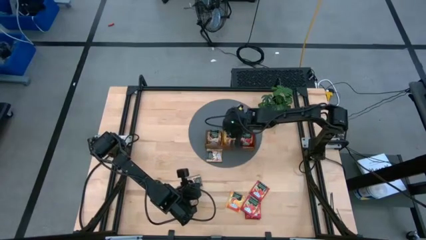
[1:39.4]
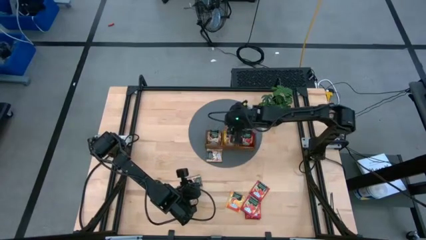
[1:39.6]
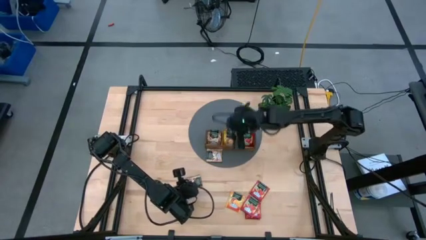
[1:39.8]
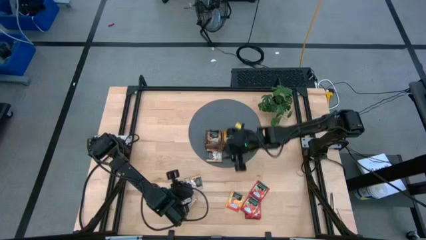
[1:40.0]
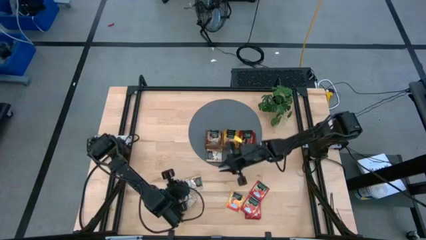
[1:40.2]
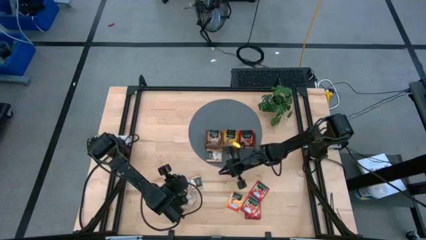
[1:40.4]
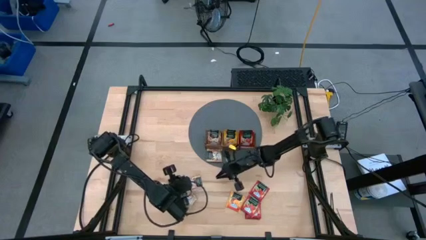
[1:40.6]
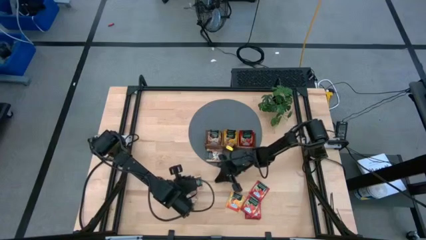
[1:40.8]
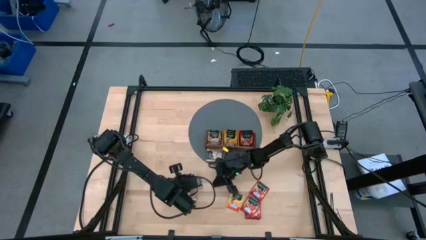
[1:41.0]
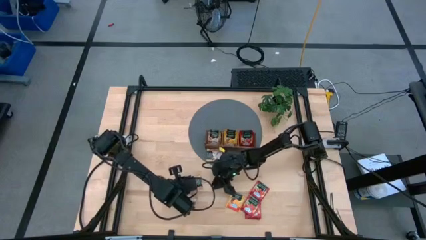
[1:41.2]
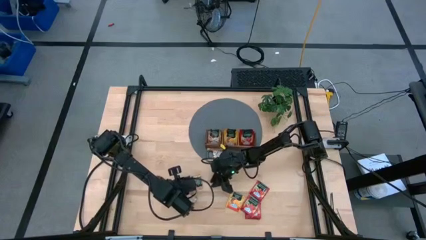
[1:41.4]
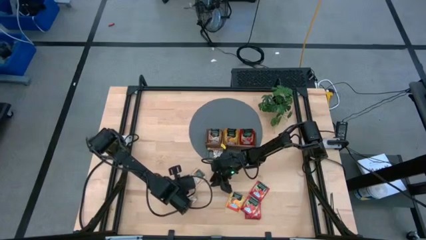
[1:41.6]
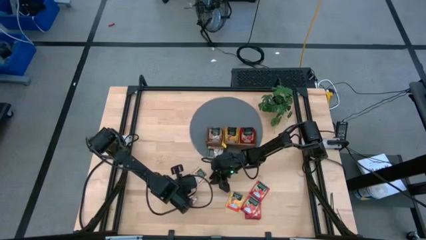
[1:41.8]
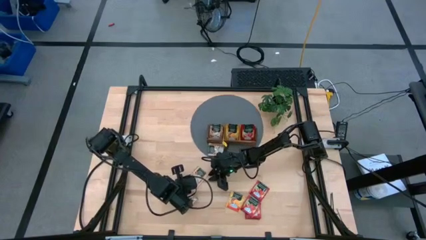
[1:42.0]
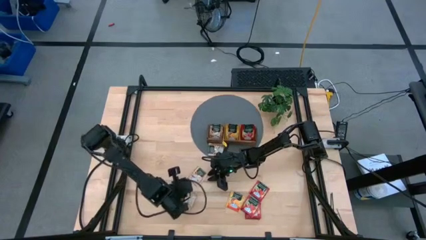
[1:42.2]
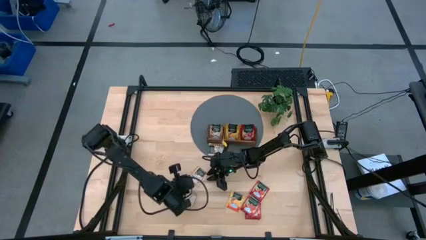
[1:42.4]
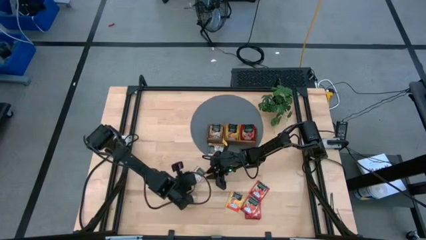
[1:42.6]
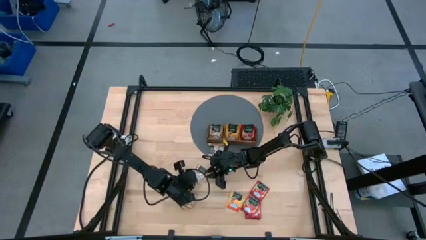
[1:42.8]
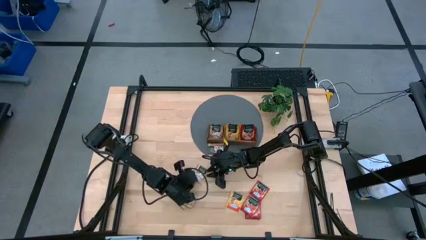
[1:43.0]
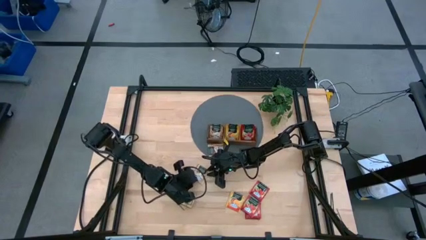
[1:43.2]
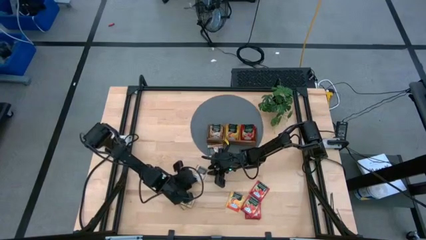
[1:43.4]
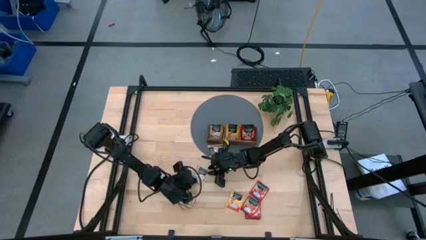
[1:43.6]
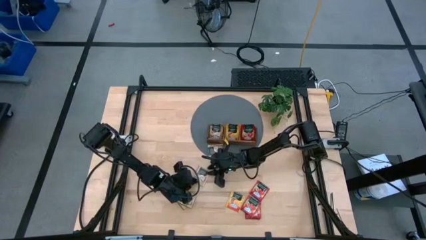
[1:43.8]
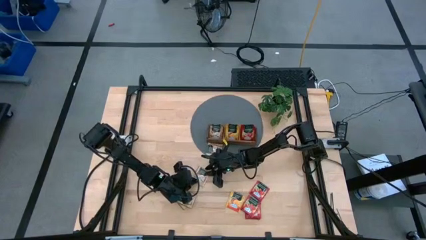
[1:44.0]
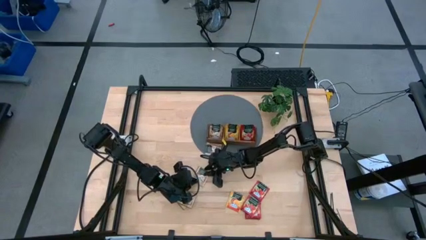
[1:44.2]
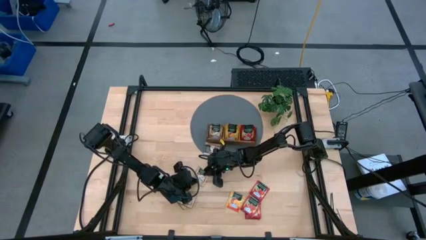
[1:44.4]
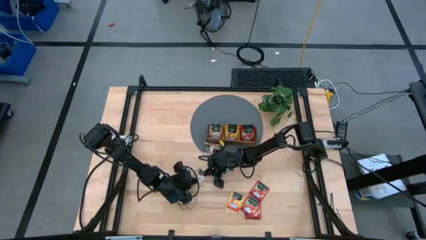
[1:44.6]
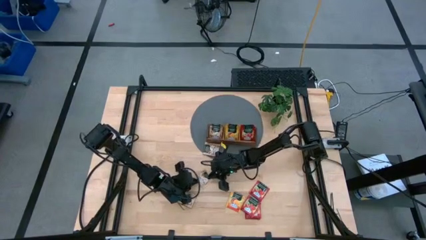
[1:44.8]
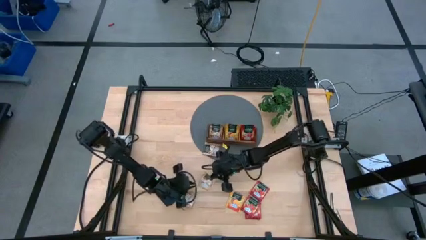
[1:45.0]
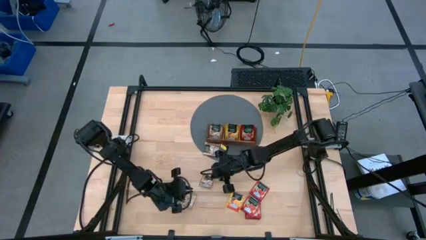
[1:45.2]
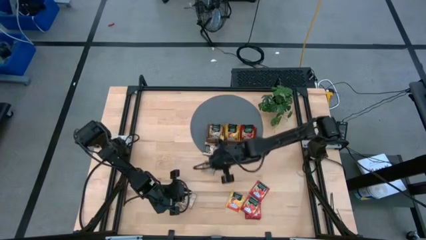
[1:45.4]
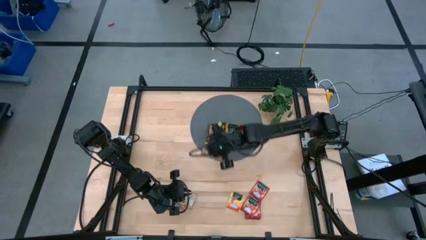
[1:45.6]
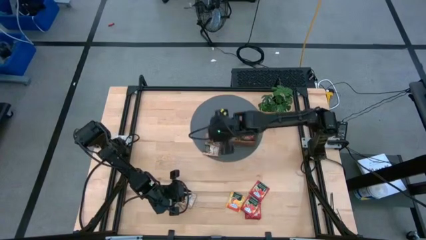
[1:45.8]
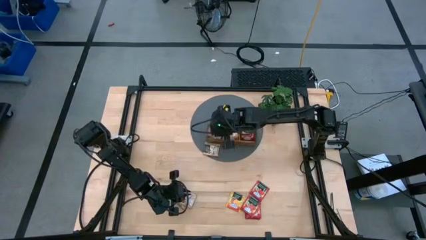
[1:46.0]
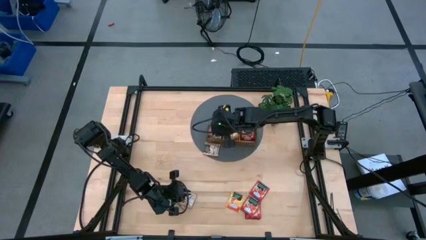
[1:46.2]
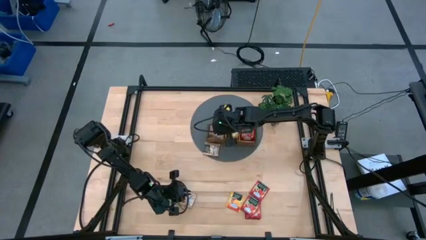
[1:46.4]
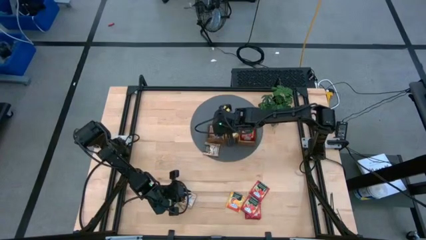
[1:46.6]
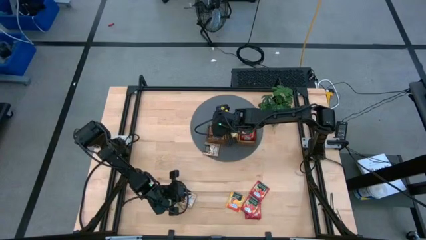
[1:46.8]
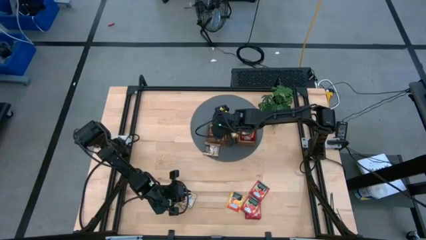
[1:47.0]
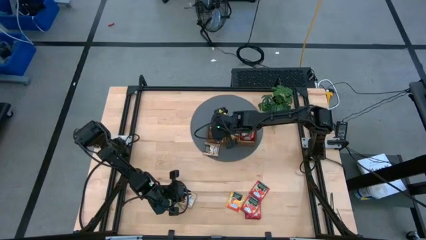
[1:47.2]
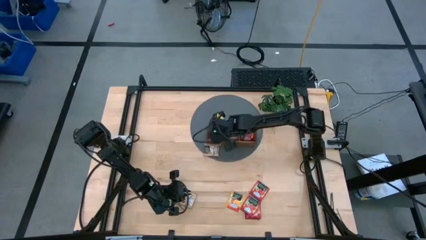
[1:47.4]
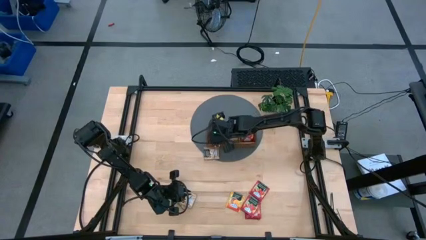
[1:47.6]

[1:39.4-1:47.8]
Task: Pick & Place Tea
Put the brown tea packet into the left section of the wooden organizer

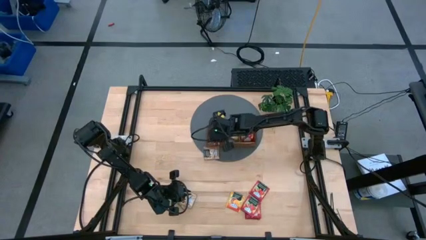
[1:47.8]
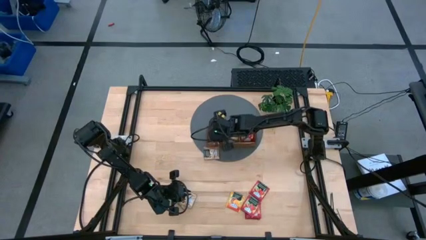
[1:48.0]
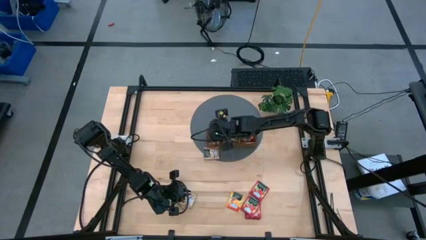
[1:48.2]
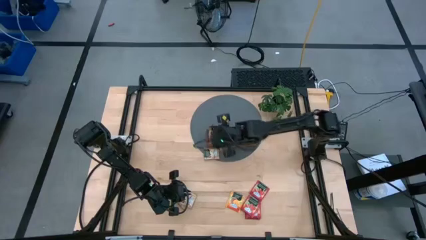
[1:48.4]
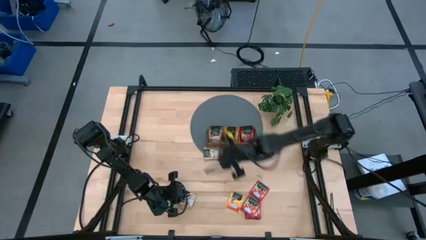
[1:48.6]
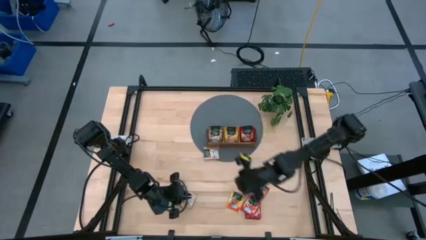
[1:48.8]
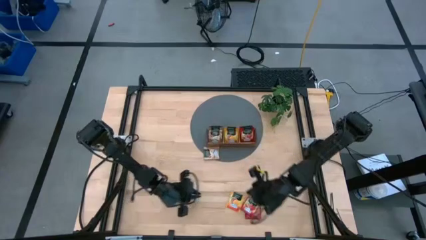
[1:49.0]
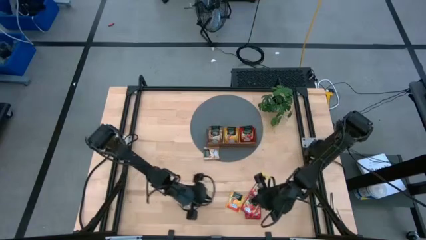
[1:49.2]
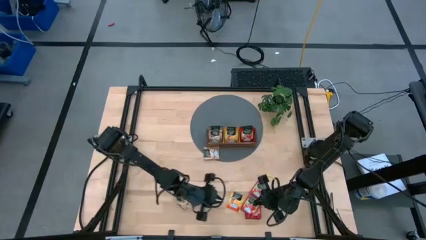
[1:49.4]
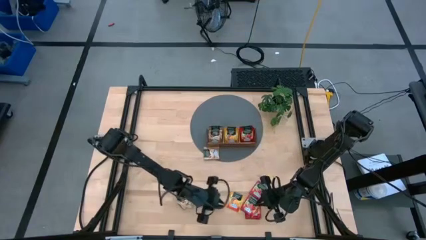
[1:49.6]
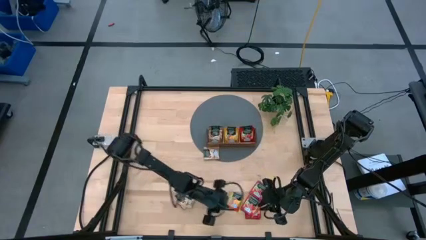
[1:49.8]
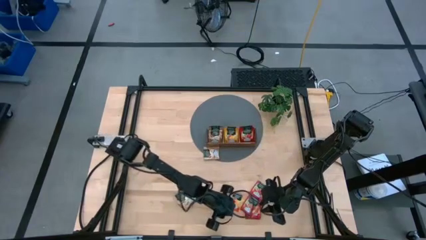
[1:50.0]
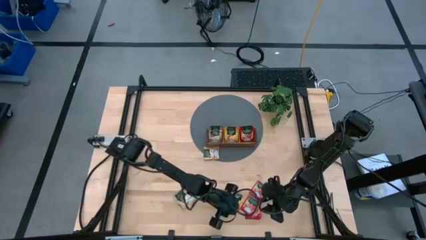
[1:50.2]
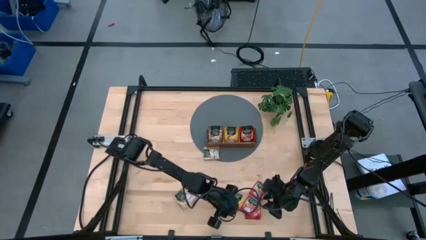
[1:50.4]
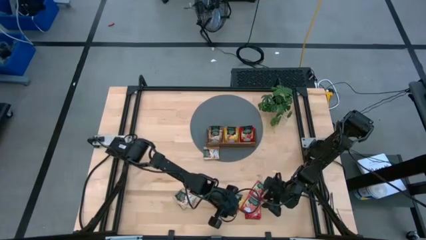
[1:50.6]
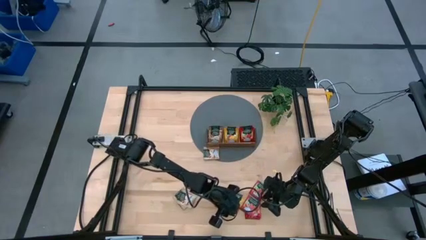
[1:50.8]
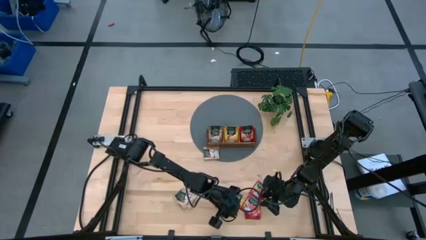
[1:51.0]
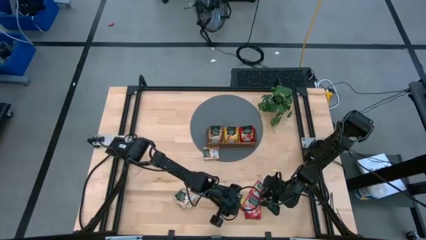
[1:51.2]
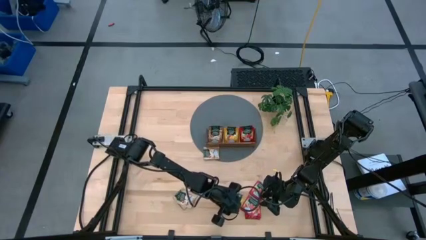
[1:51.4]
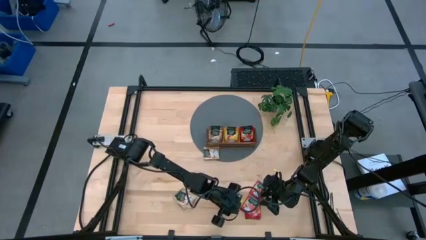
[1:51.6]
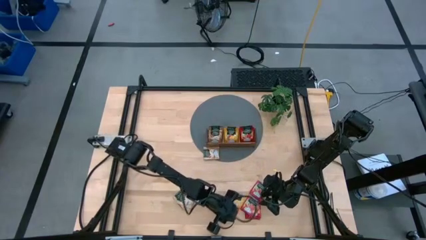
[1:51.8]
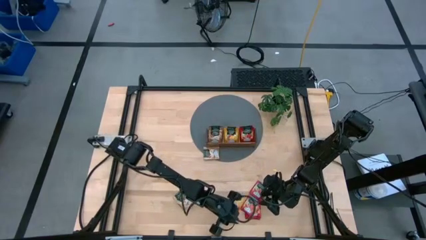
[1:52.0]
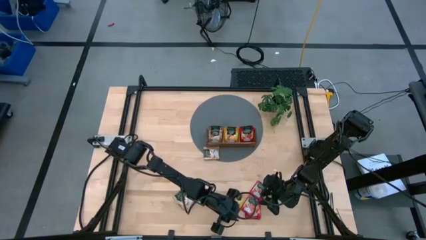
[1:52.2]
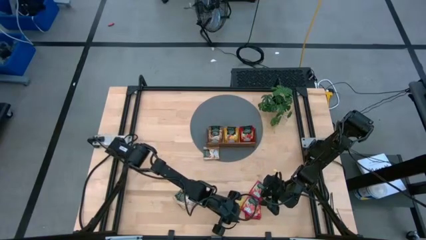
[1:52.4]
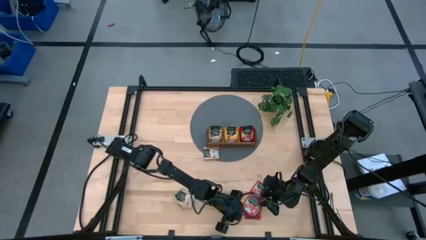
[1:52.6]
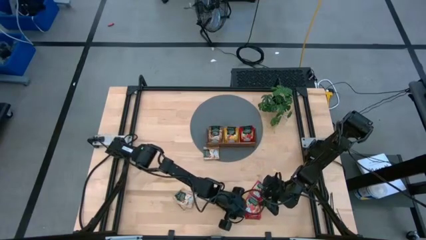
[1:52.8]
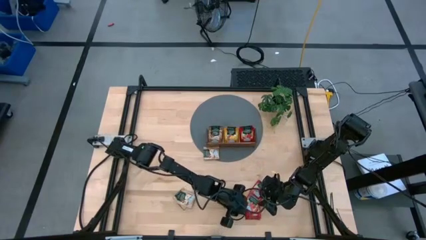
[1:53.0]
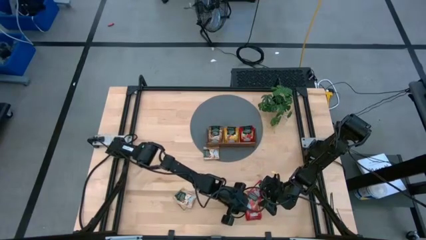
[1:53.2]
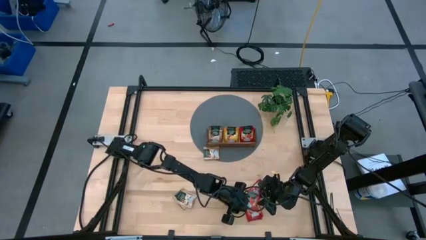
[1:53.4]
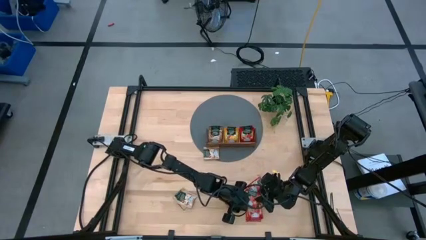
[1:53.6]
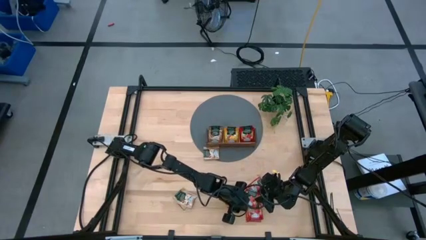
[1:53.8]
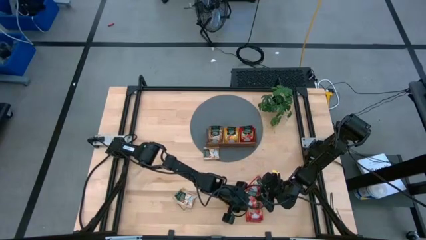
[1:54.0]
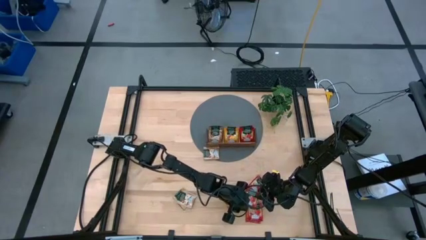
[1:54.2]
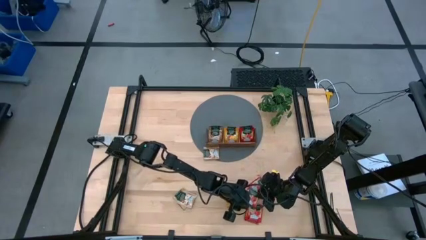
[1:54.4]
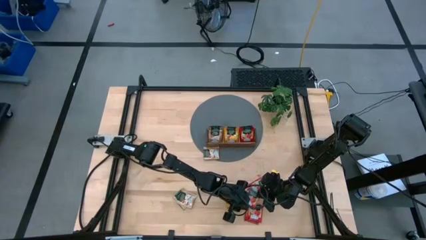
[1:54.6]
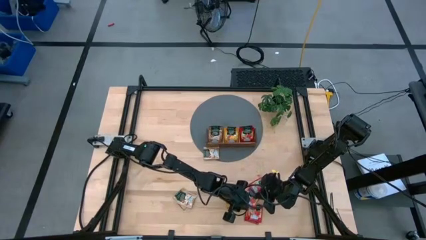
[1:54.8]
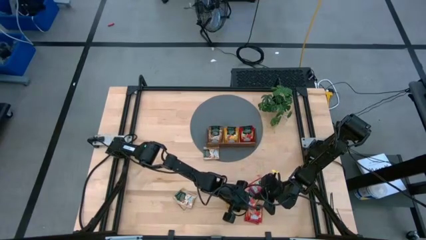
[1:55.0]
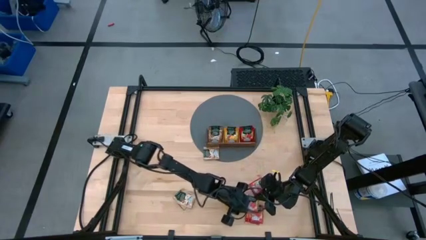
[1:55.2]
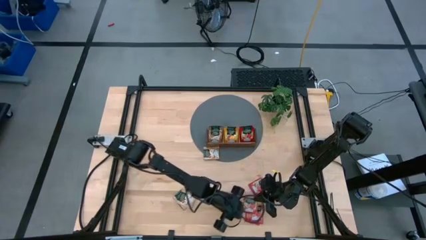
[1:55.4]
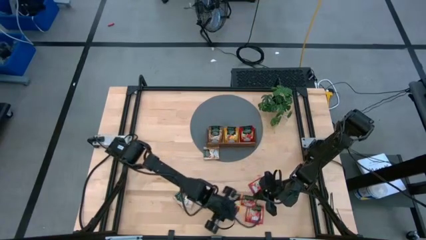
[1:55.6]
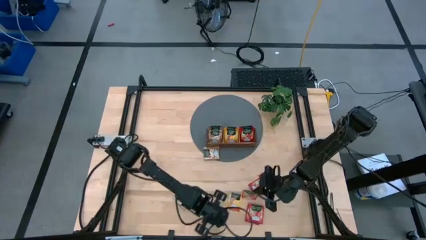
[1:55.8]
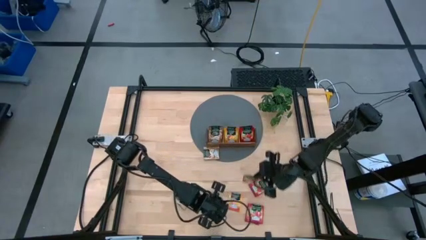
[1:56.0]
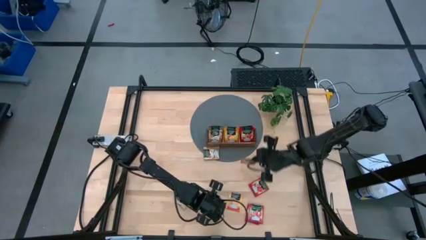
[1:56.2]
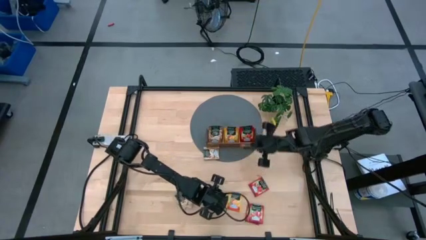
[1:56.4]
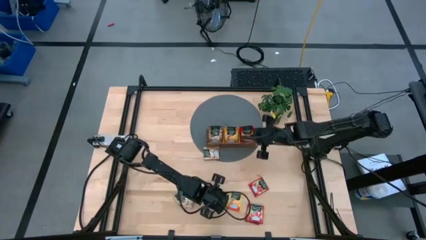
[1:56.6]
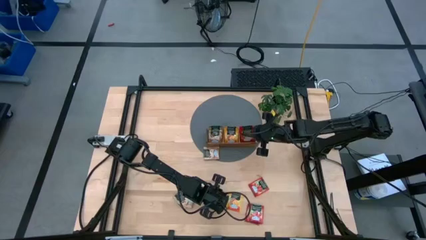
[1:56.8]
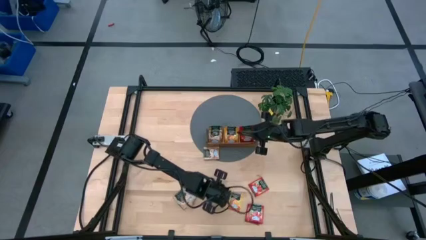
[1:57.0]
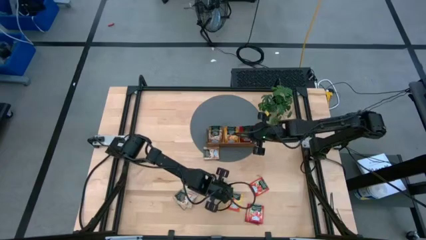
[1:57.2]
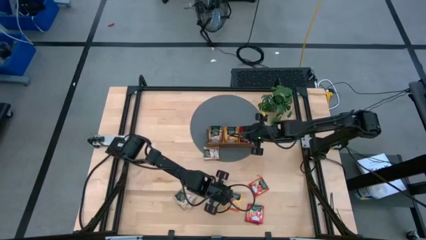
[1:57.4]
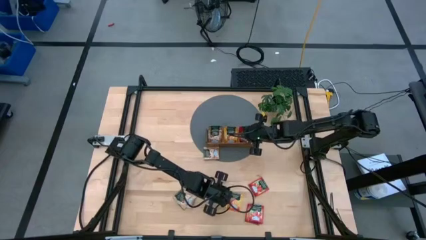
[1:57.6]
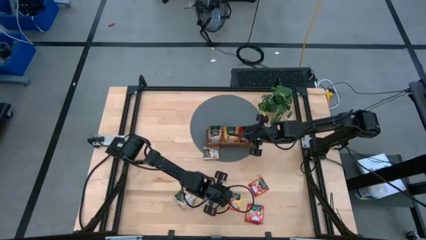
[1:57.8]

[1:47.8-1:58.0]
Put the red tea packet into the right section of the wooden organizer
